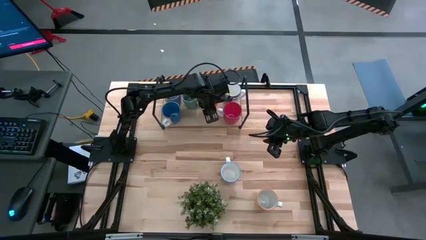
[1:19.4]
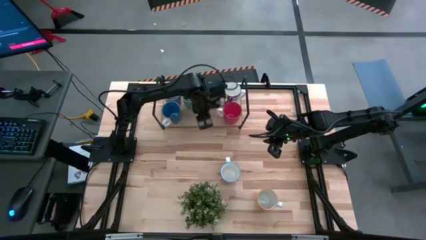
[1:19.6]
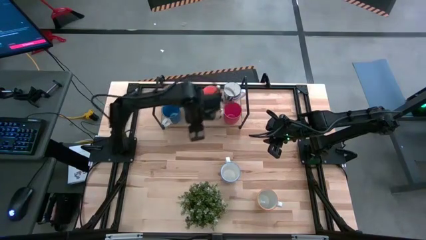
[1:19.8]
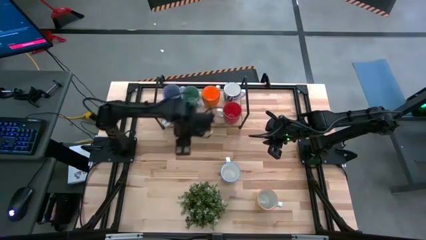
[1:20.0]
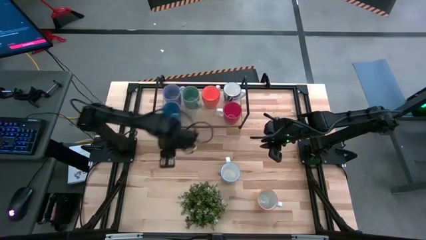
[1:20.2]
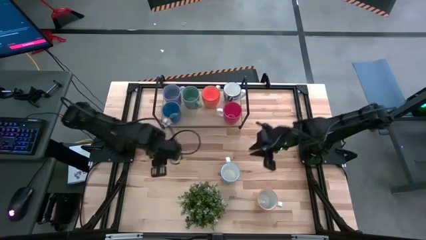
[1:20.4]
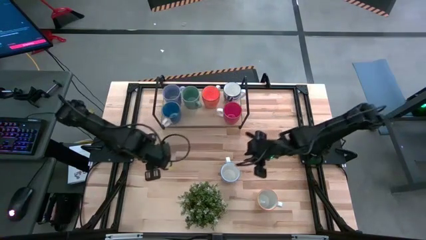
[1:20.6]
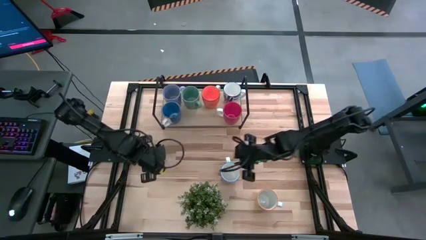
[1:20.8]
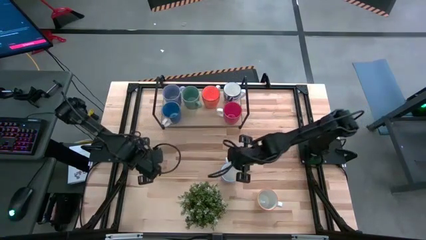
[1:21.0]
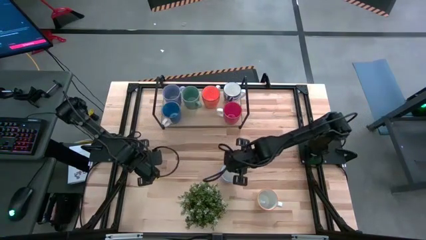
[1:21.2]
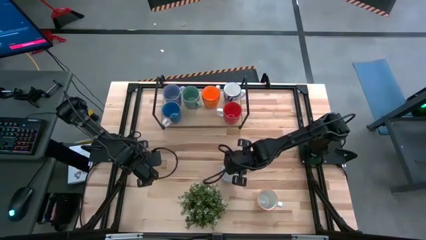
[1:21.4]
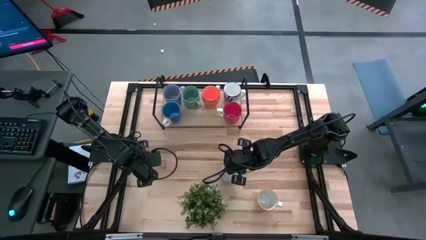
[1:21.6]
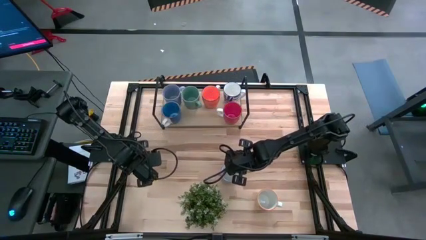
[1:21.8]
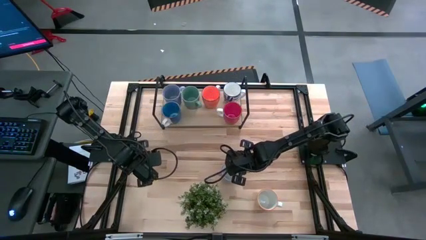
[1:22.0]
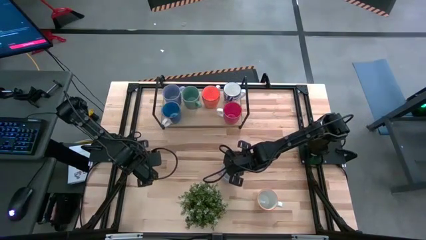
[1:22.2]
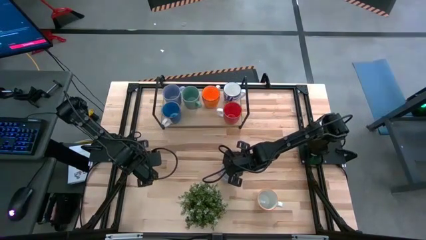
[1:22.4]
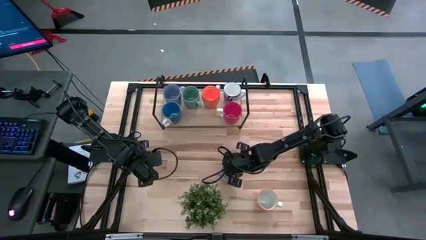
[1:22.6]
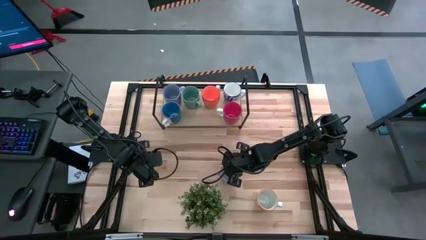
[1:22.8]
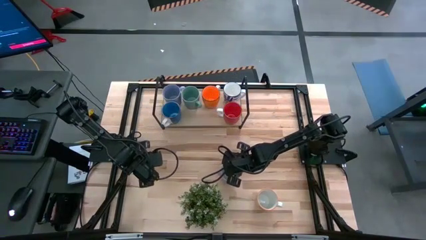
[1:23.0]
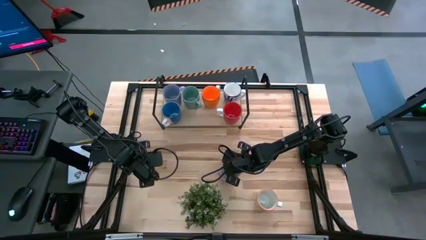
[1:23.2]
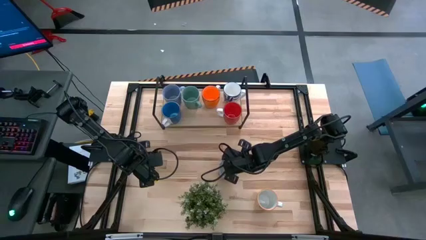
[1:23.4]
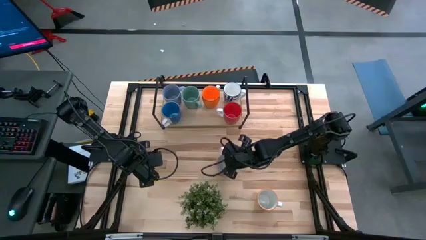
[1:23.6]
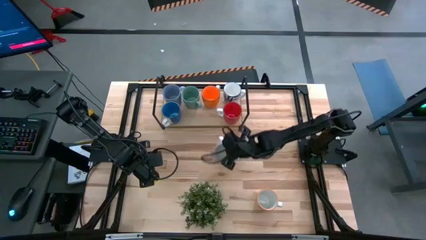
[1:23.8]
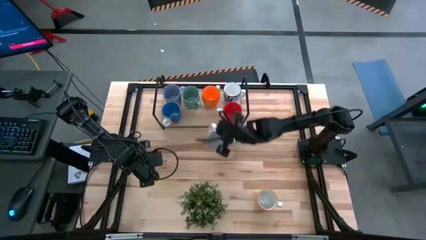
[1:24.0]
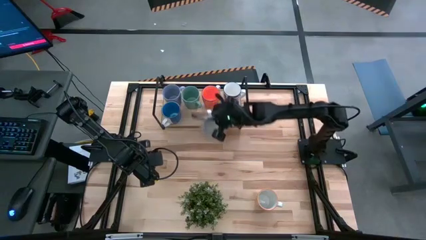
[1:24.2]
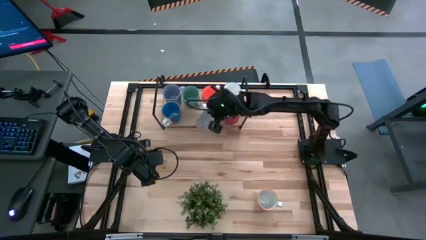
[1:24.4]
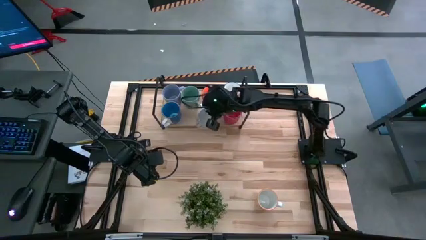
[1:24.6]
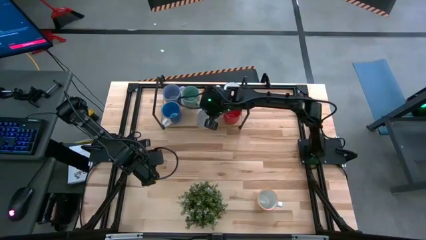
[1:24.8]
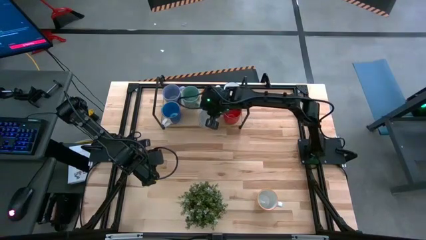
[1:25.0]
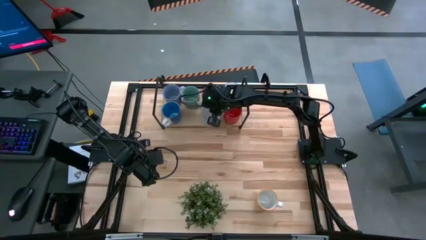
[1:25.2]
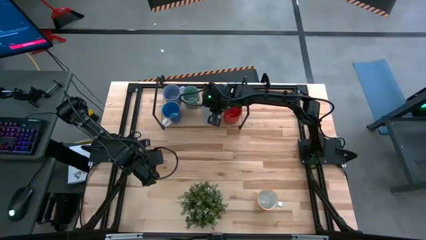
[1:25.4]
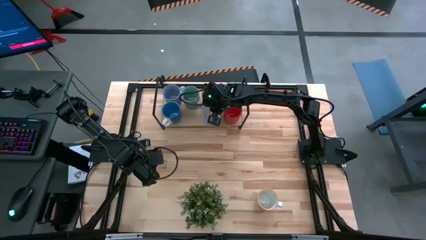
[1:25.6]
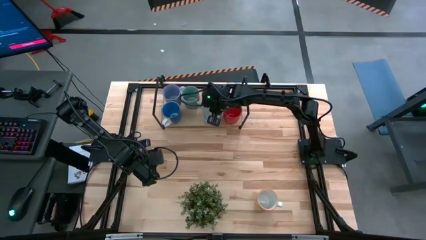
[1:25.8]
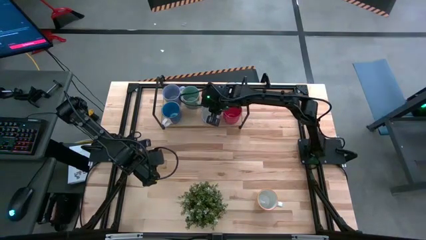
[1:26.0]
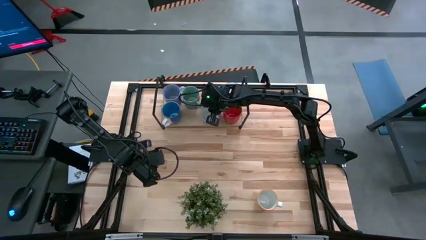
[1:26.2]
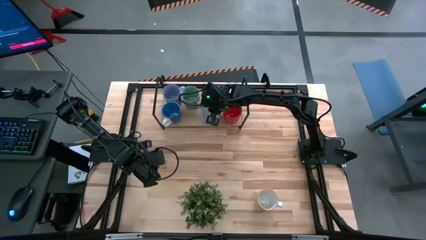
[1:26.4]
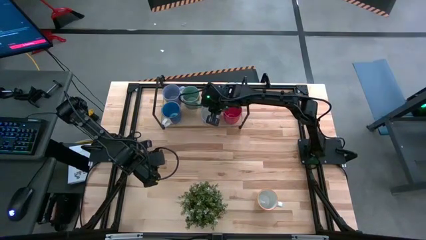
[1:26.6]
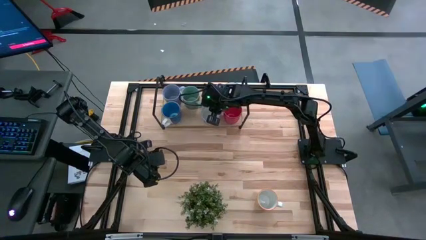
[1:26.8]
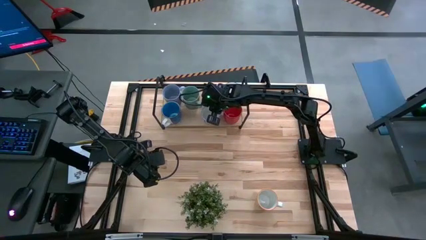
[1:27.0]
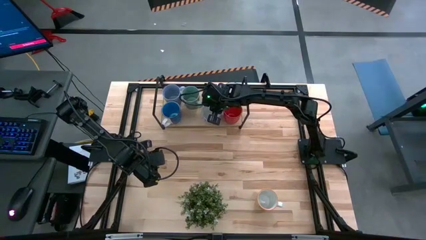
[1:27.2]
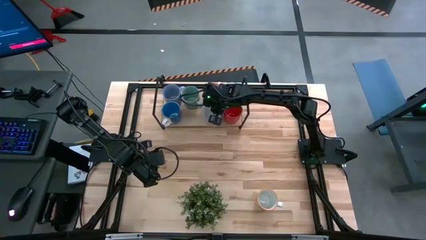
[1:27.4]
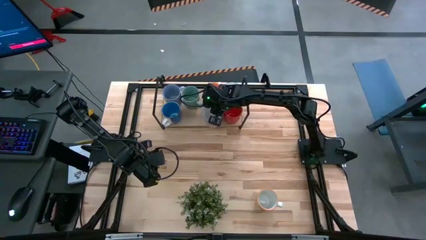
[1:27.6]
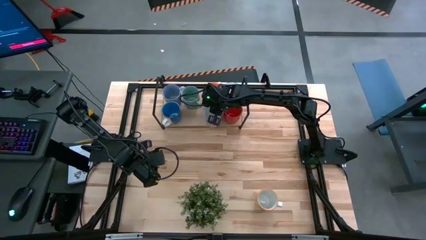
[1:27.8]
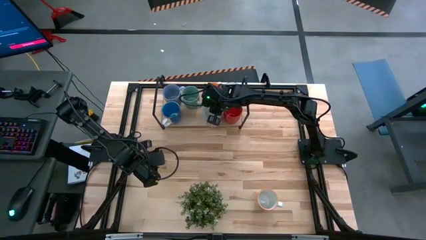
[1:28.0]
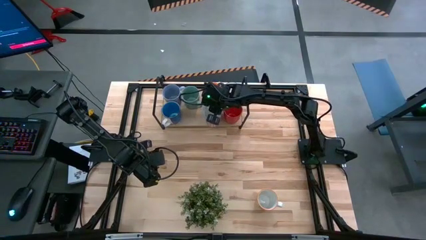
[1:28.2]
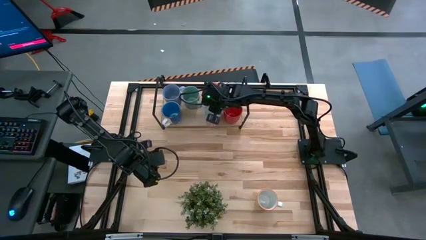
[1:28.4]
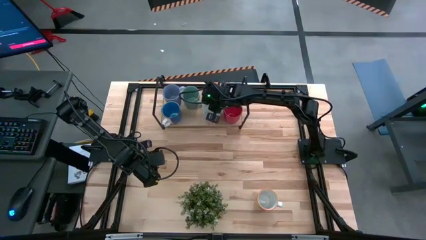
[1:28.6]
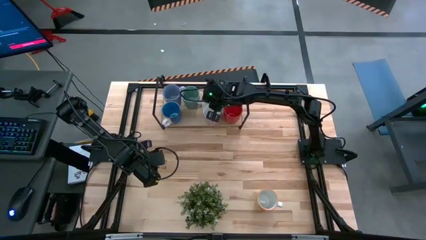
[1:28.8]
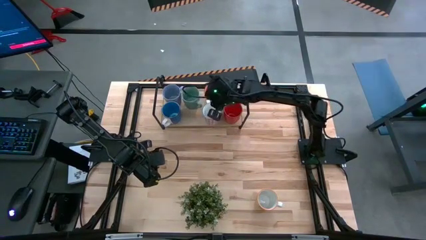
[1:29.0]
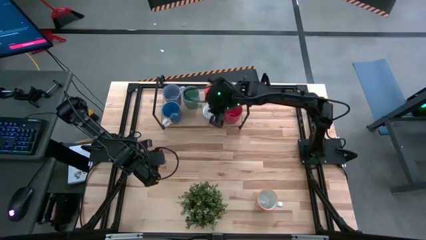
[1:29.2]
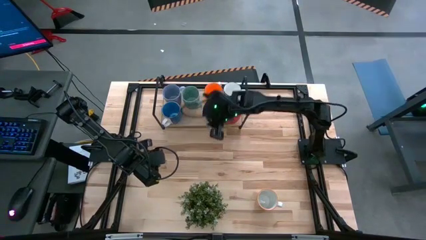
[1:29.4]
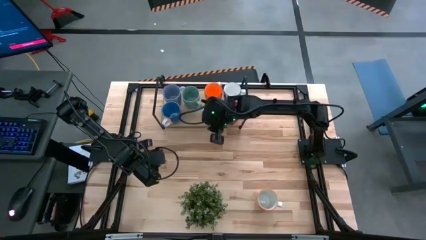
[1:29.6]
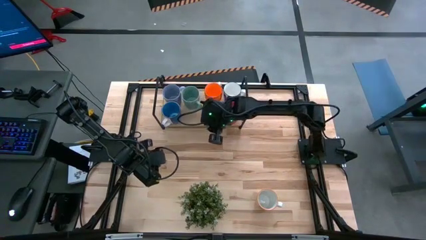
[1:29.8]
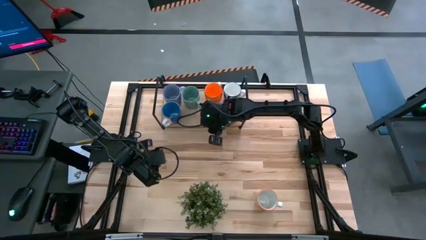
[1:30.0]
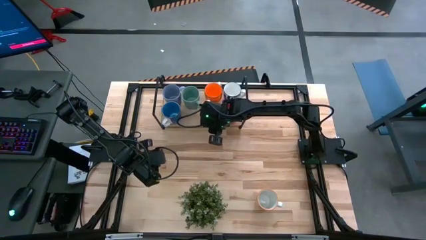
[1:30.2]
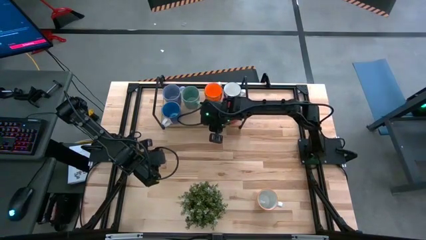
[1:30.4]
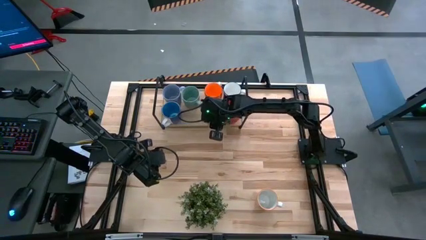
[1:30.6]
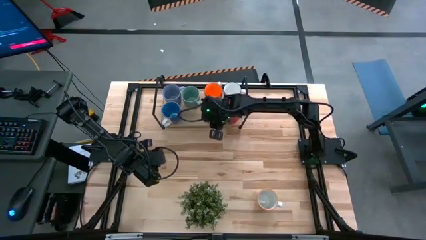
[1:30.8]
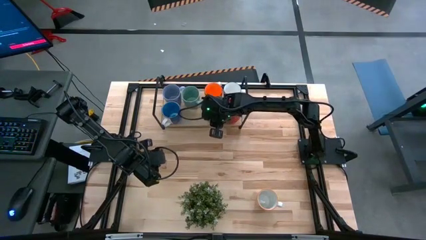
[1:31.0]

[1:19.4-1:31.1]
Task: Place coffee mugs
Put the white red patterned mug on the shelf

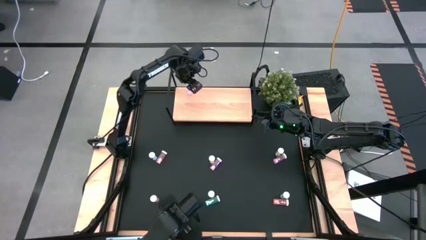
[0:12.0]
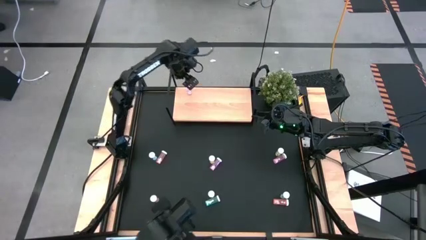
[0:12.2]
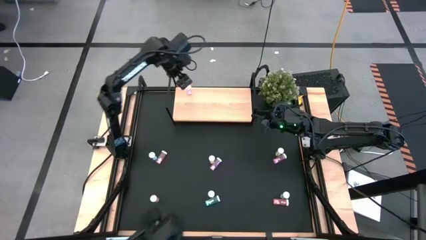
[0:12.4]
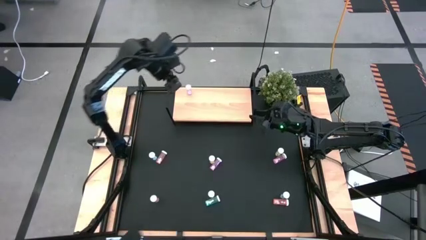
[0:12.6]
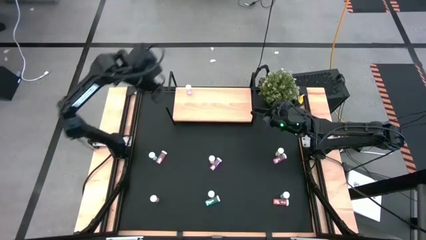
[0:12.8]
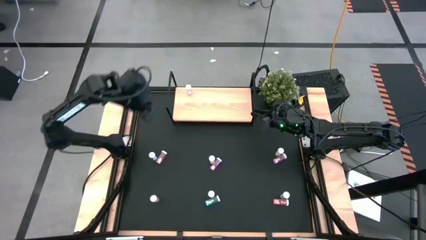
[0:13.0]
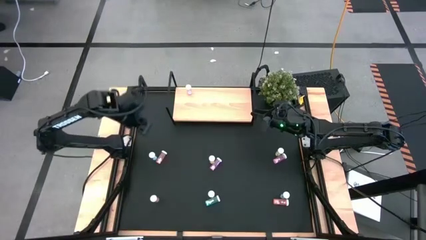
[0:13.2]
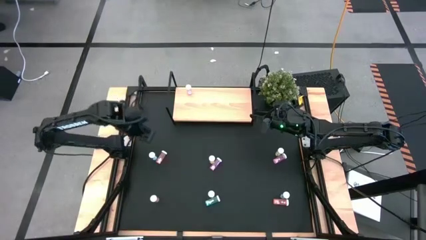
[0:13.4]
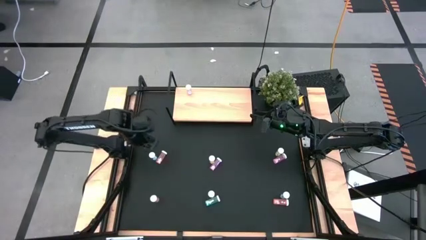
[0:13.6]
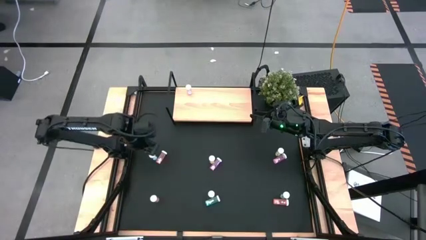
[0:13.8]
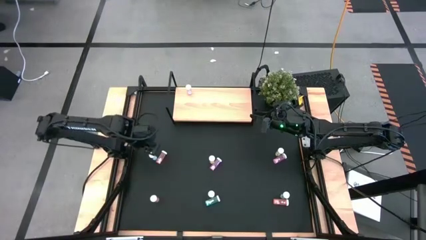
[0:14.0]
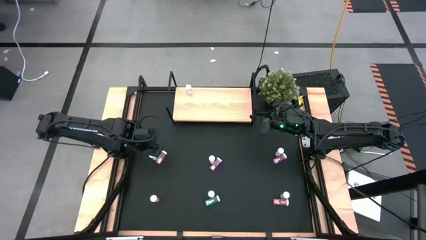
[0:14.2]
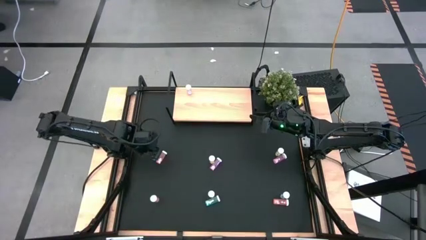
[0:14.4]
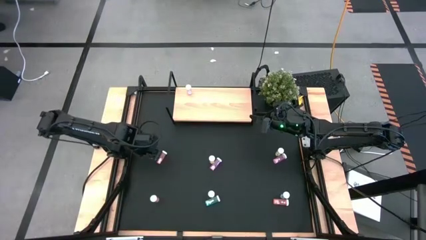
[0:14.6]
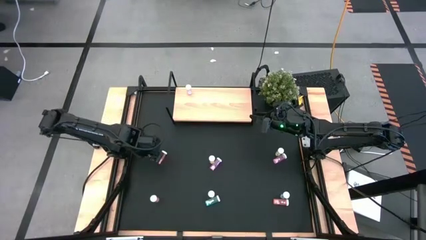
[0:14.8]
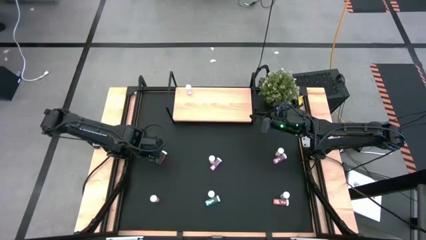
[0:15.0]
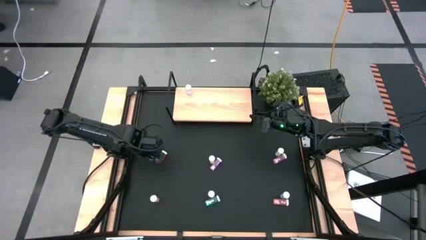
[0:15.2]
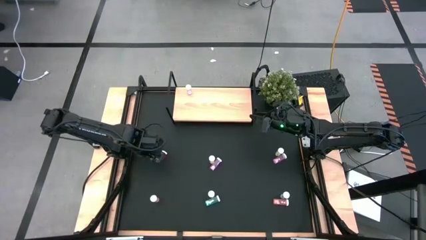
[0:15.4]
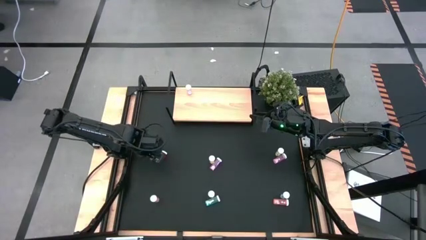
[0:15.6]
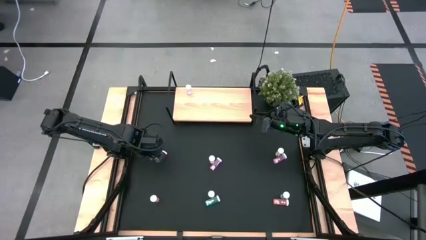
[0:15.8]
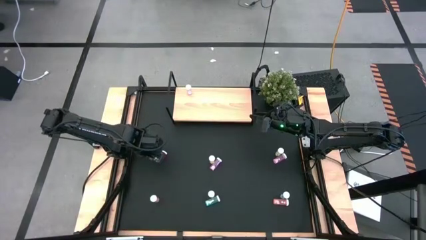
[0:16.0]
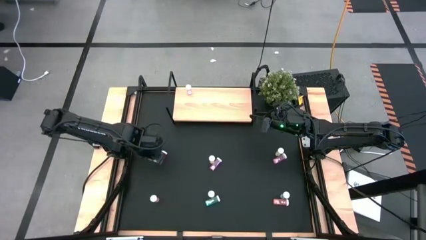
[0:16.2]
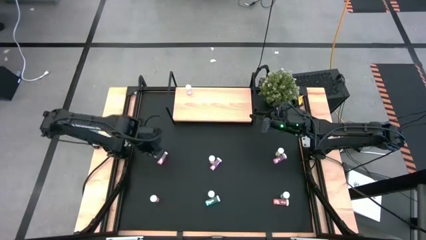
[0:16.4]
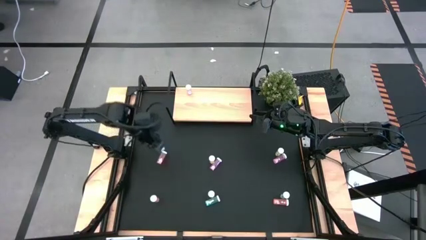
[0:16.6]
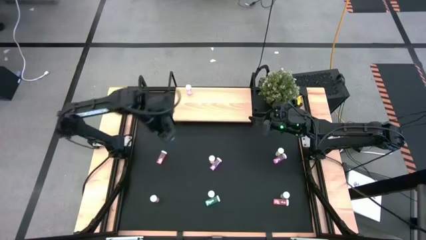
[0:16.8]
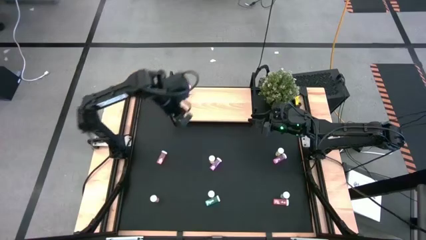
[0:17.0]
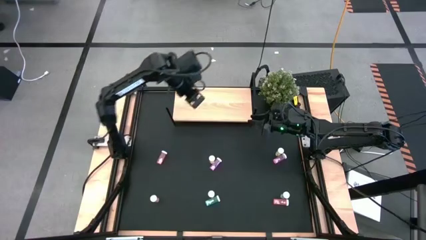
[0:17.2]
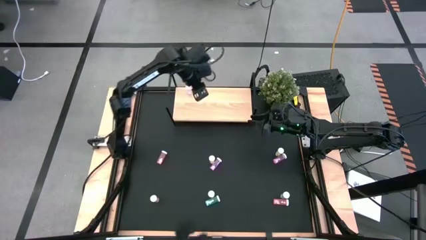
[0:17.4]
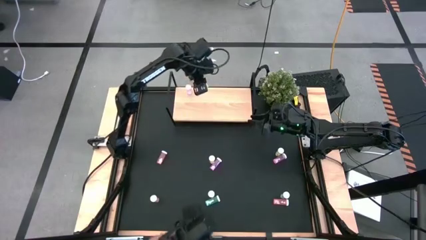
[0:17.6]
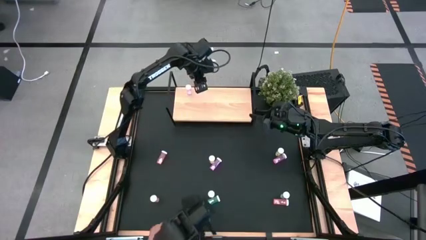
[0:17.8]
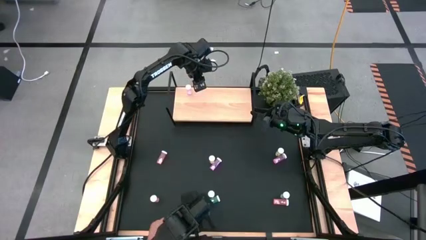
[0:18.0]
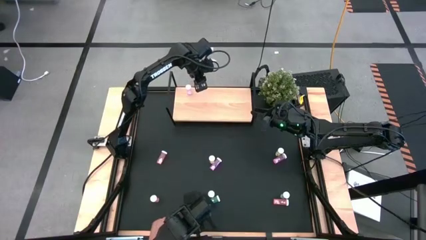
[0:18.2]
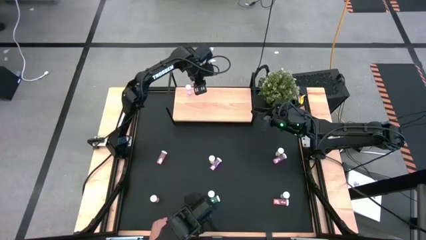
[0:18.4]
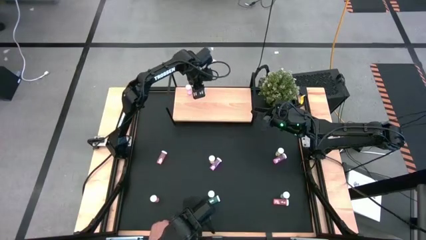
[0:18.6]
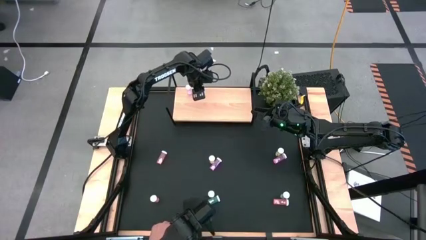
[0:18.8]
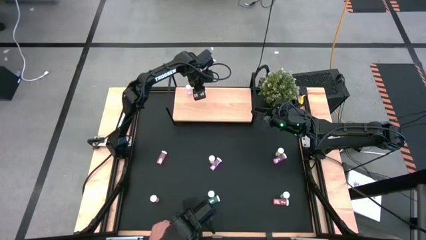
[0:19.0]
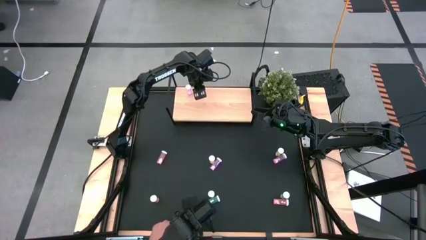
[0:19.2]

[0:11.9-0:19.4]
Task: Pick and place medicine bottles onto shelf by color
Put the top left blue medicine bottle on the shelf
